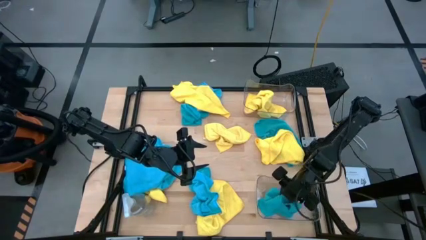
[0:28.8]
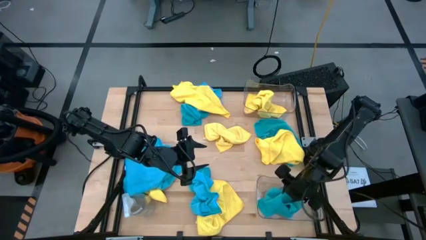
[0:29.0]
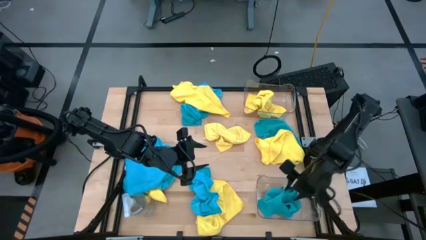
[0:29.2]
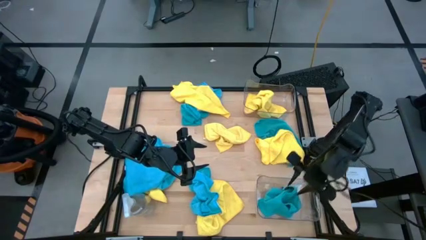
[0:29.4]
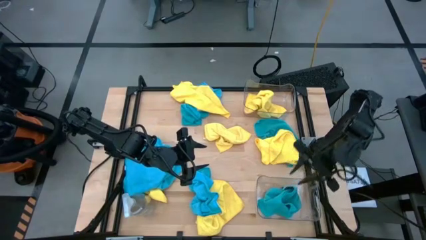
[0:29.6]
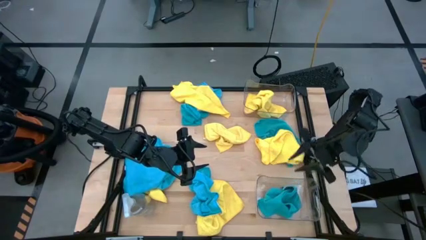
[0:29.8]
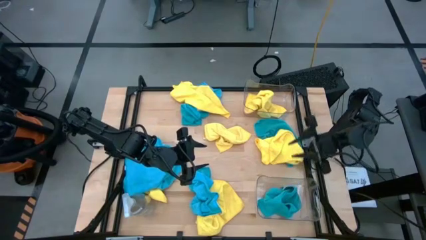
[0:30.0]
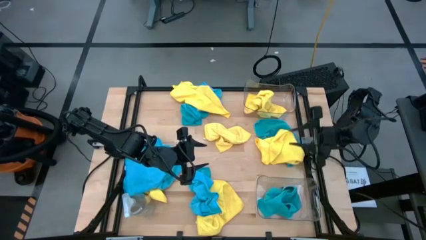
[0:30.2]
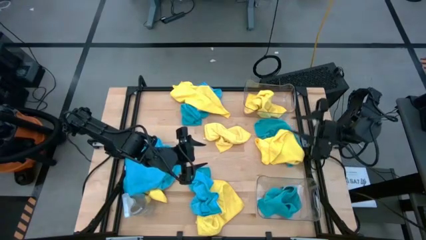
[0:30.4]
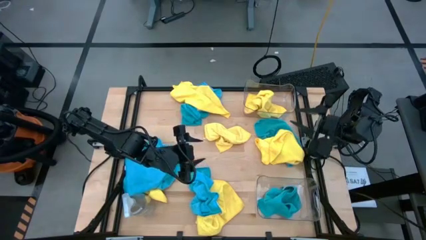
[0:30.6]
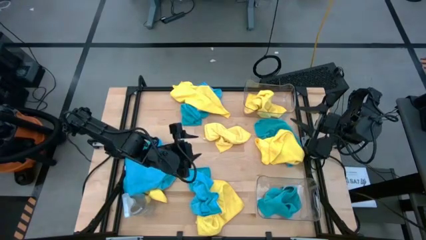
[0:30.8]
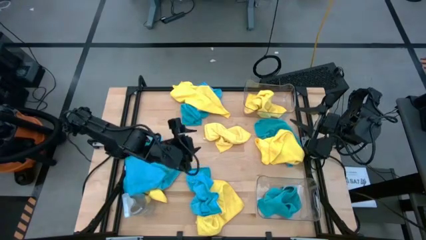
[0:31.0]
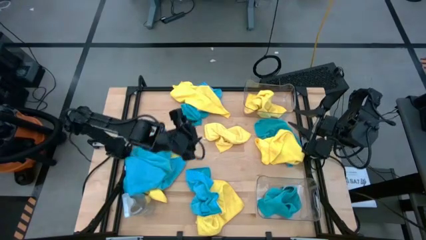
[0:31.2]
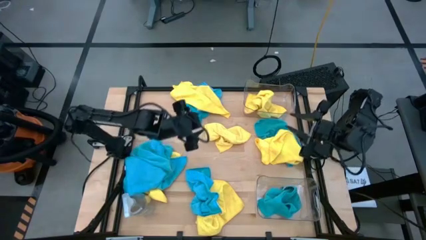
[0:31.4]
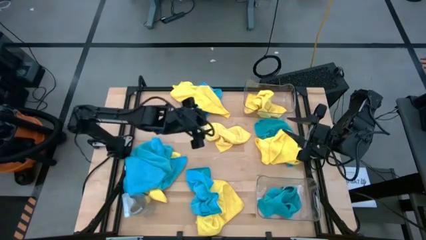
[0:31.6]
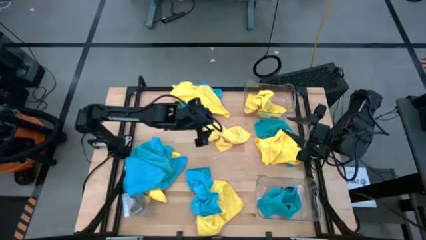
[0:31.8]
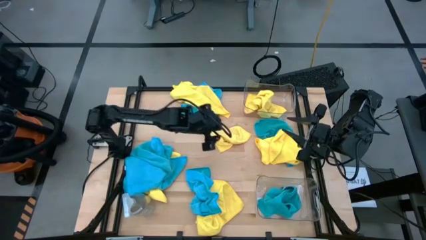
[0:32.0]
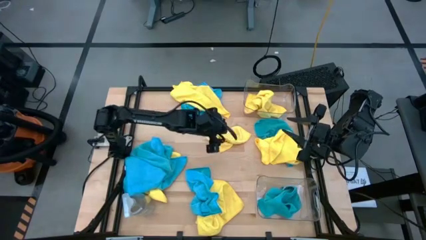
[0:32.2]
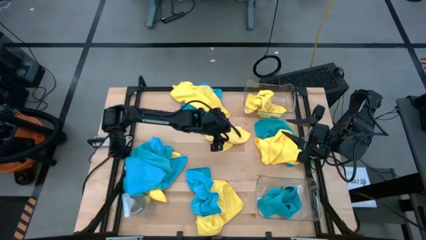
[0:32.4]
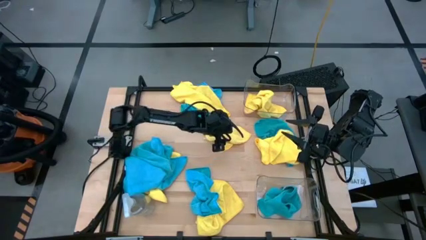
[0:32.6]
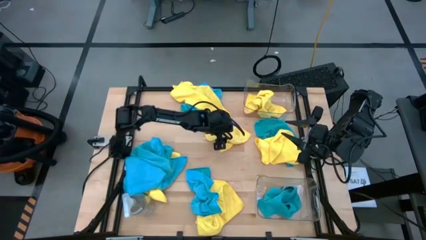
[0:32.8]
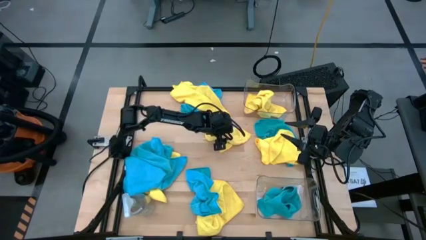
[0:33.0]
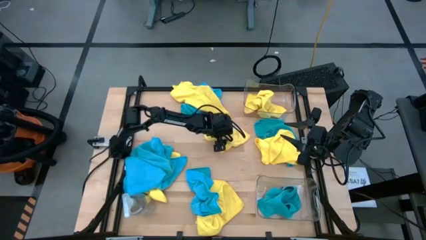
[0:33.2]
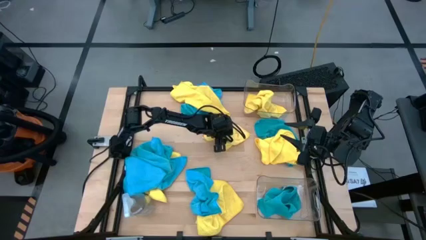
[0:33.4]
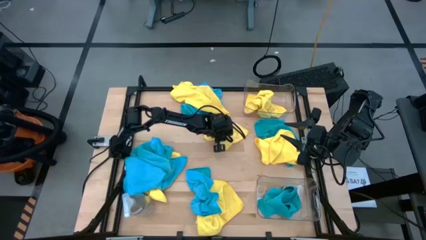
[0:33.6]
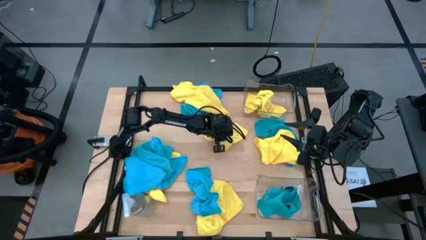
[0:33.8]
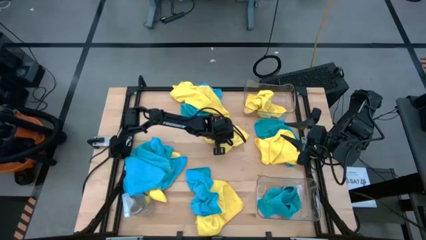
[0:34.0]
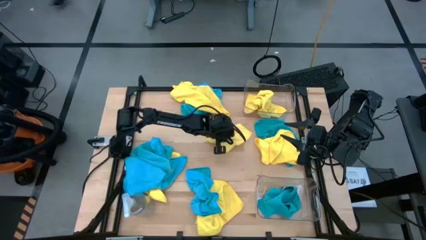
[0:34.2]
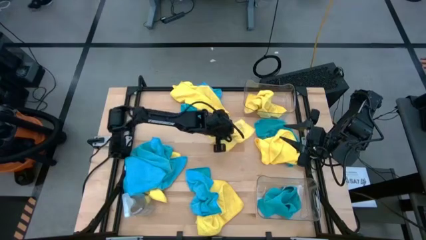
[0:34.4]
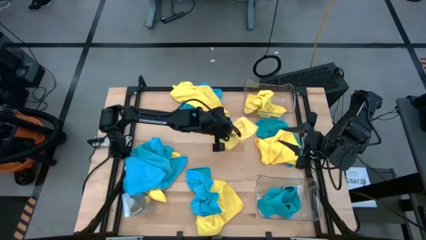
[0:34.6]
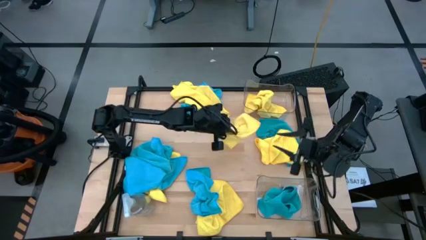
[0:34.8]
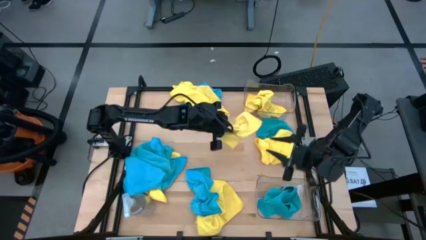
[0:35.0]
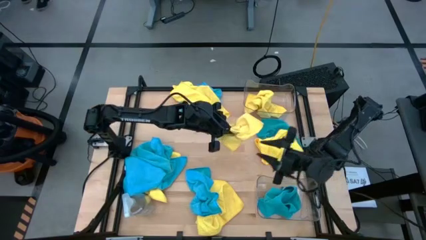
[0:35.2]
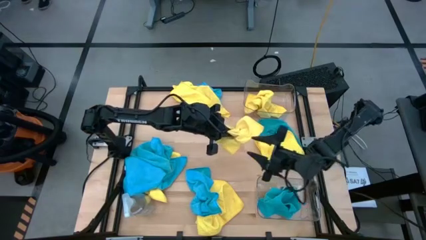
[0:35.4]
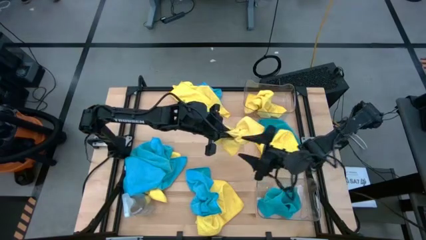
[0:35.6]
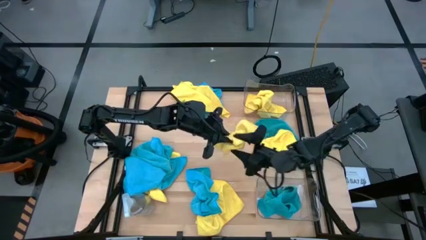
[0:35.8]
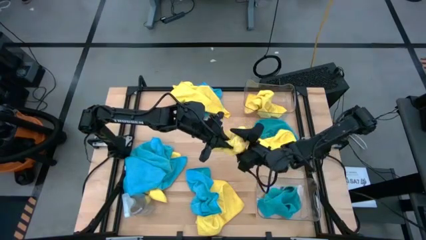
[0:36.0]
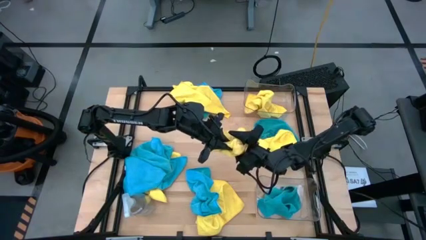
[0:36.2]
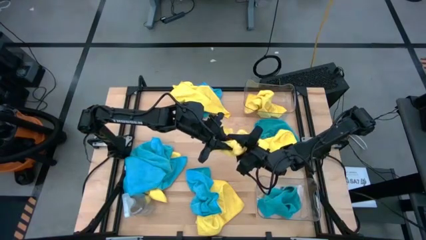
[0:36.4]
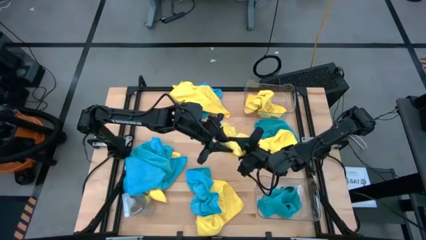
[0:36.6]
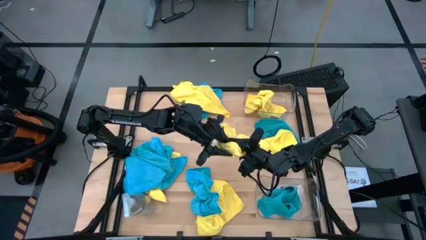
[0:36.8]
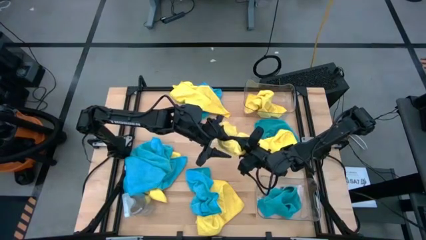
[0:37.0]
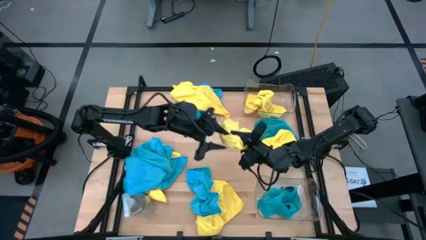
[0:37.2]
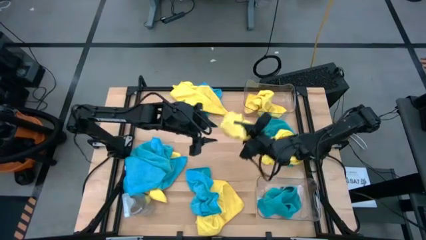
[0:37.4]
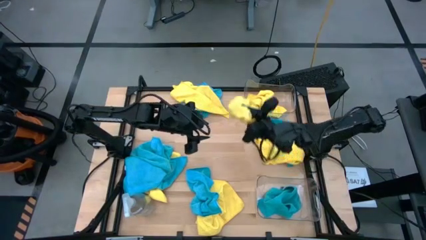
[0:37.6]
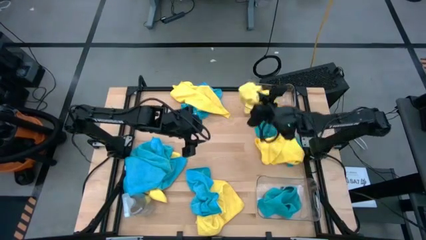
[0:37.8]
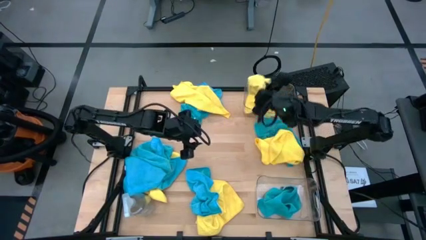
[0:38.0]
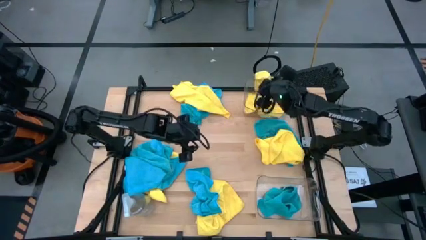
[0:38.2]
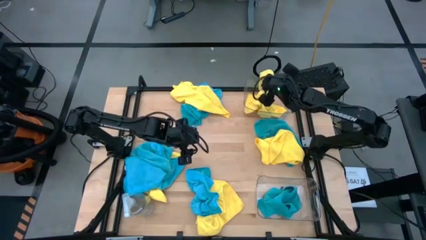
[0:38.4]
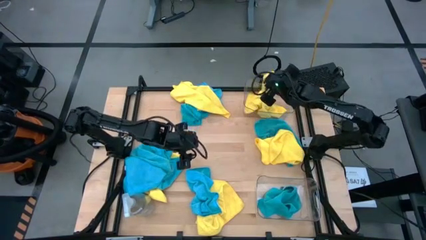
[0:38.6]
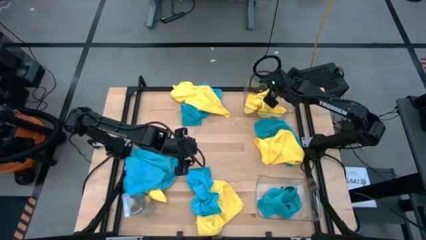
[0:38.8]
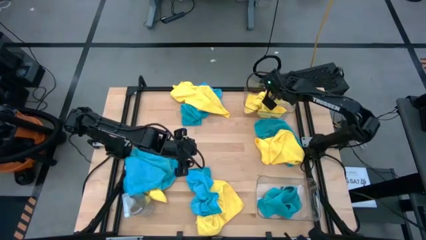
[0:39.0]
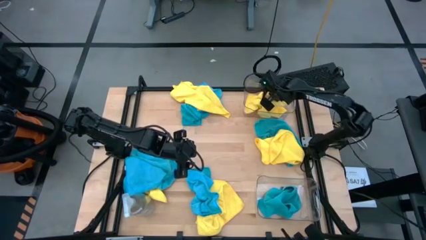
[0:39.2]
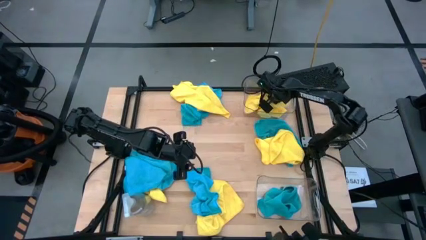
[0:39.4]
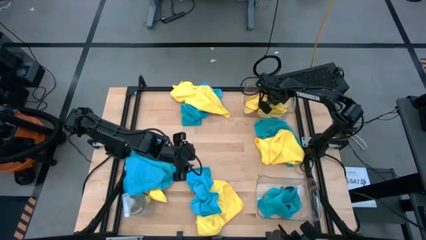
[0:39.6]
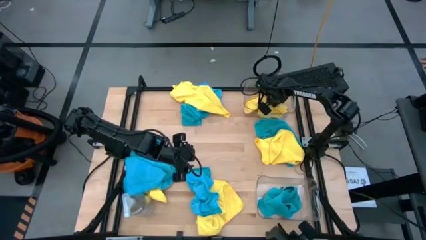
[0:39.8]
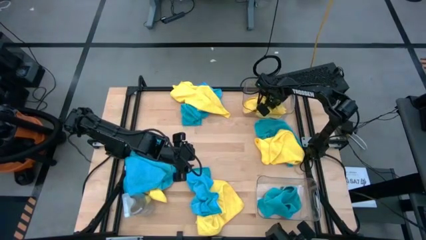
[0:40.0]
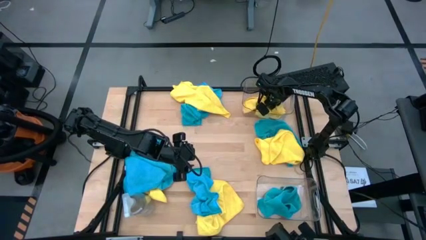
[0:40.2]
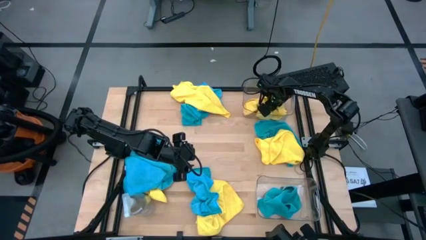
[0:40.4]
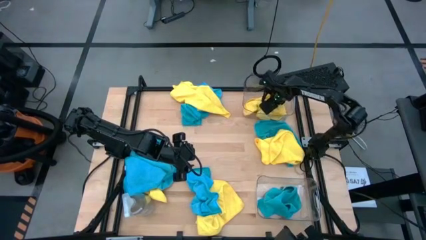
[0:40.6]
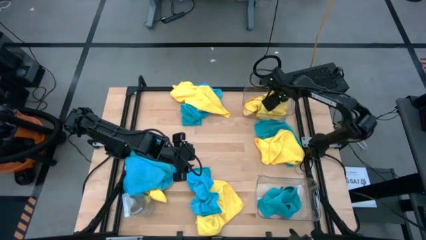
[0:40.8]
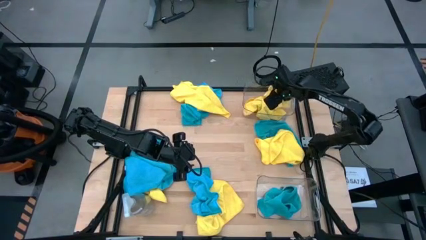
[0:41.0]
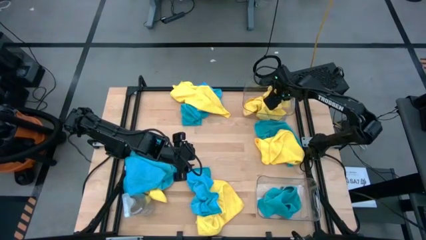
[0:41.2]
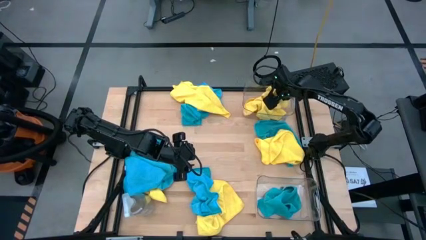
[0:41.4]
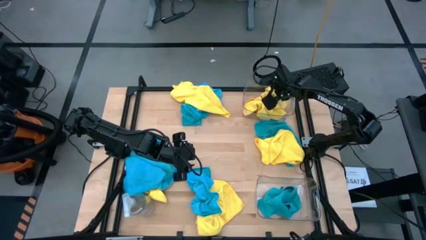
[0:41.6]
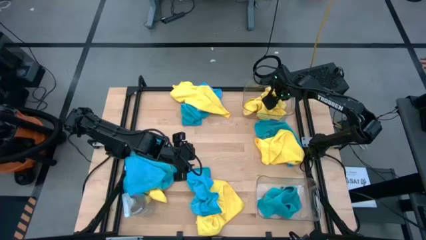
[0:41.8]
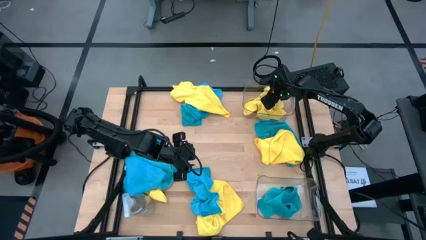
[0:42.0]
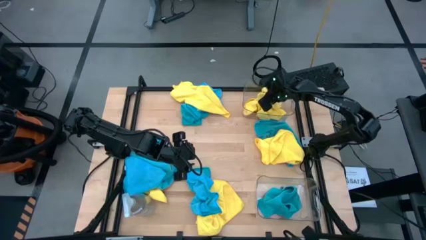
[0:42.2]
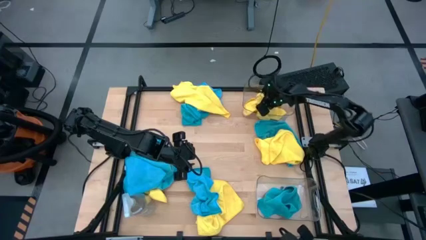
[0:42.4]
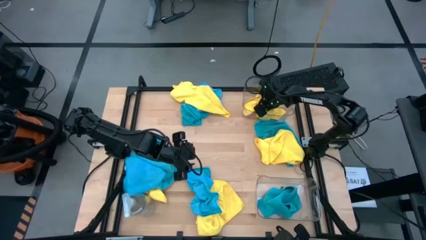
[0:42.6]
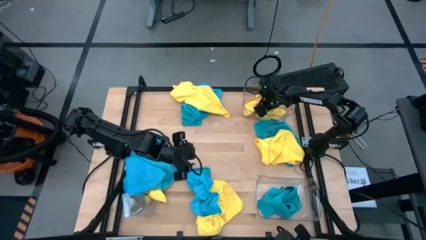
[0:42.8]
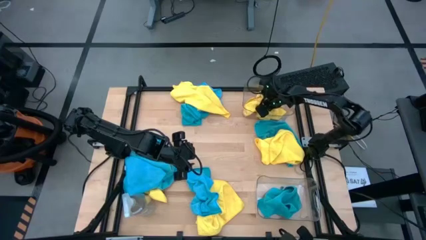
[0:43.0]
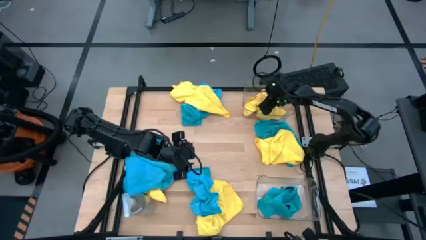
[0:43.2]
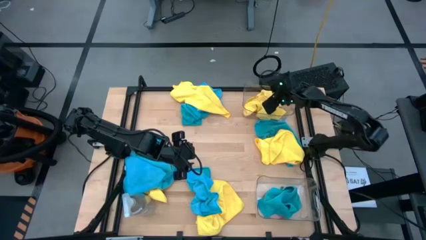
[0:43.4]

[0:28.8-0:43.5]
Task: Sort microfiber towel by color & place in baskets
Put the yellow microfiber cloth into the top transparent bin
